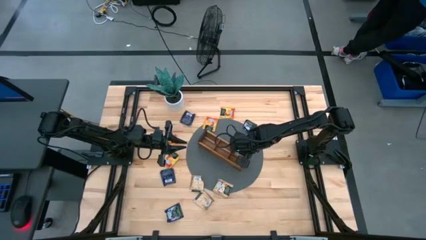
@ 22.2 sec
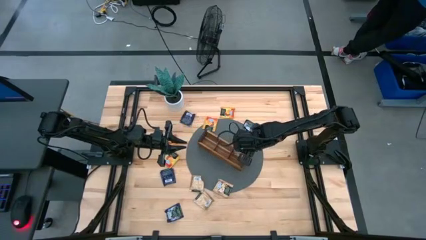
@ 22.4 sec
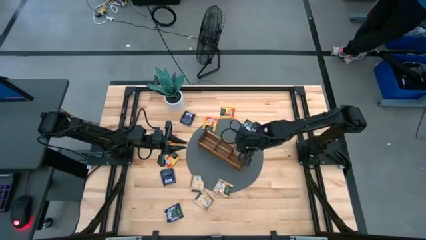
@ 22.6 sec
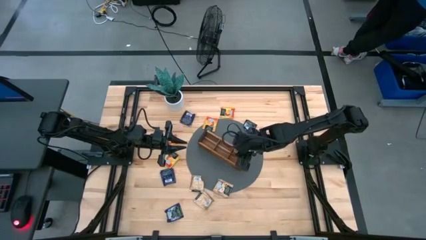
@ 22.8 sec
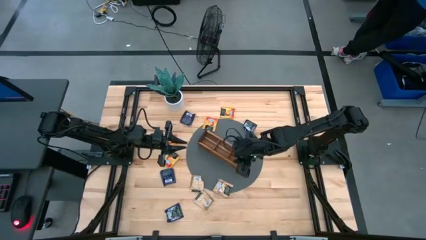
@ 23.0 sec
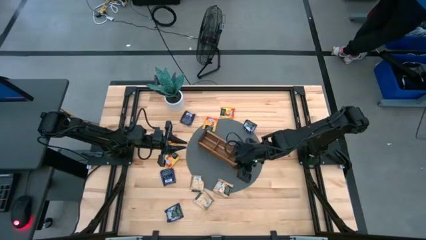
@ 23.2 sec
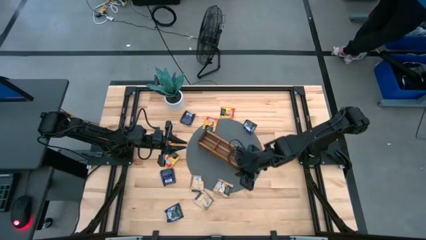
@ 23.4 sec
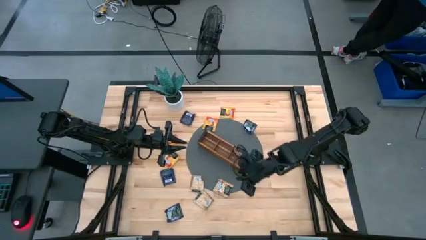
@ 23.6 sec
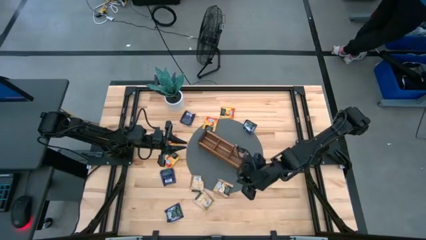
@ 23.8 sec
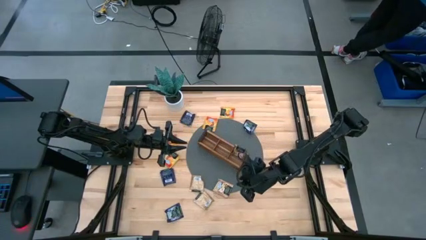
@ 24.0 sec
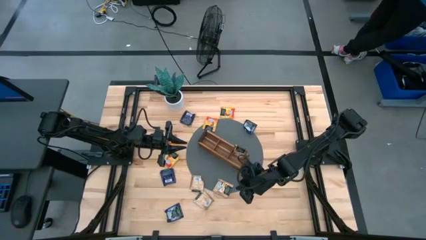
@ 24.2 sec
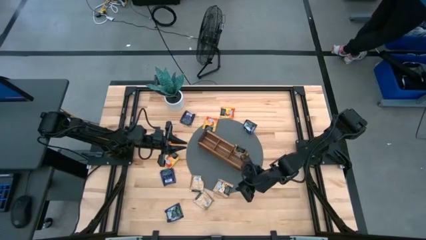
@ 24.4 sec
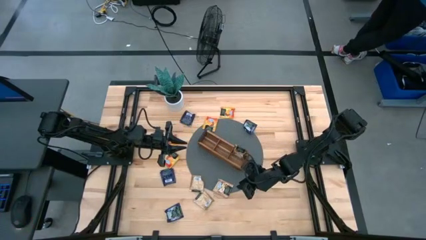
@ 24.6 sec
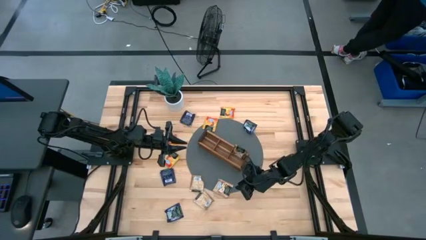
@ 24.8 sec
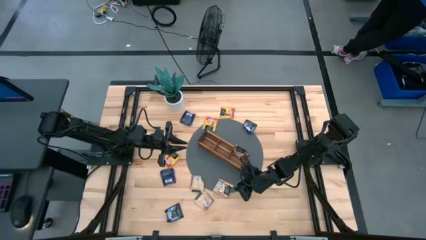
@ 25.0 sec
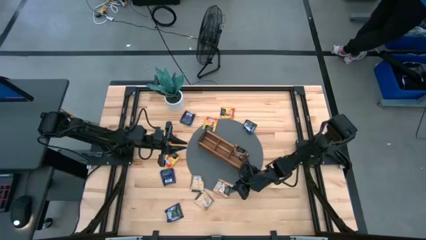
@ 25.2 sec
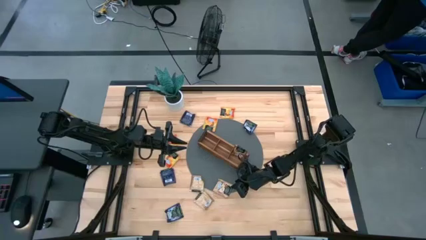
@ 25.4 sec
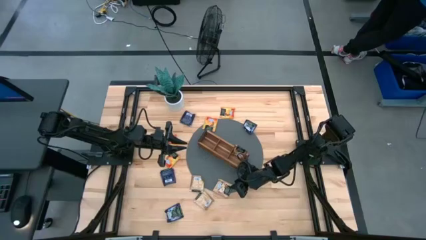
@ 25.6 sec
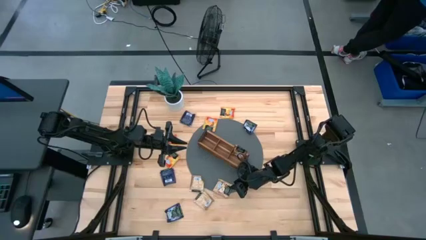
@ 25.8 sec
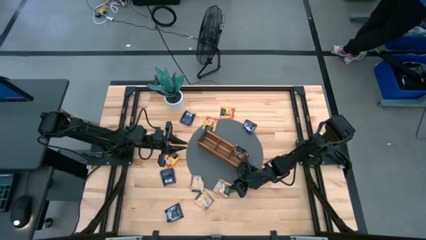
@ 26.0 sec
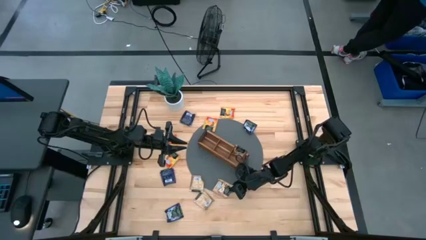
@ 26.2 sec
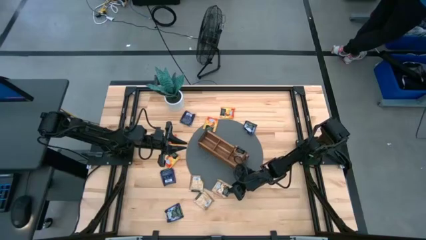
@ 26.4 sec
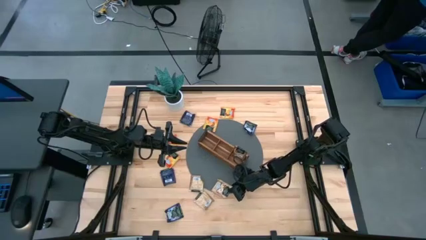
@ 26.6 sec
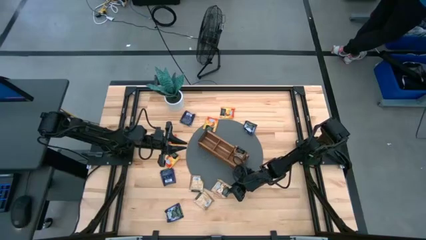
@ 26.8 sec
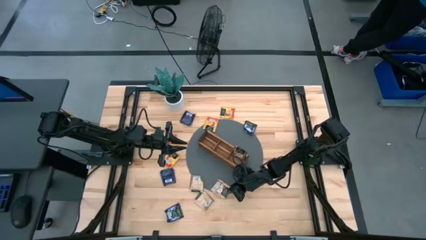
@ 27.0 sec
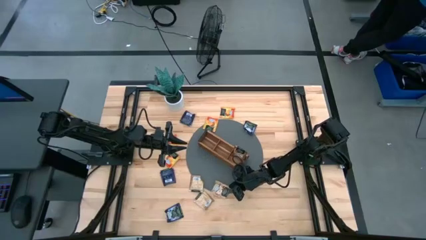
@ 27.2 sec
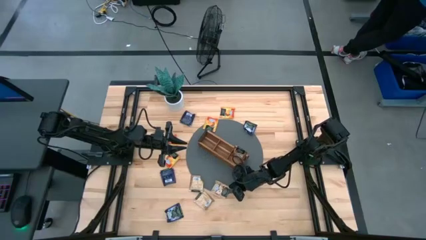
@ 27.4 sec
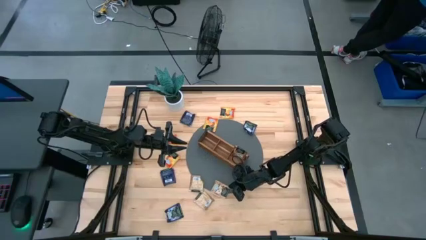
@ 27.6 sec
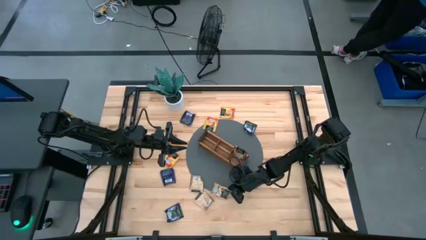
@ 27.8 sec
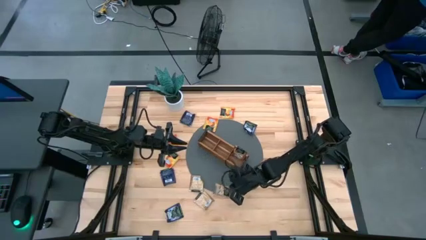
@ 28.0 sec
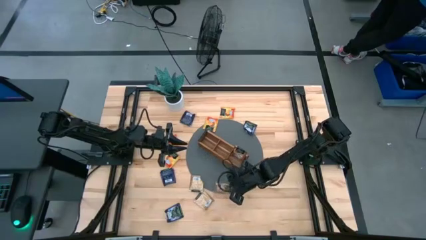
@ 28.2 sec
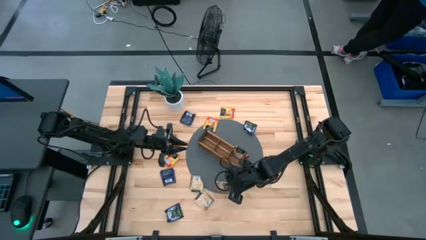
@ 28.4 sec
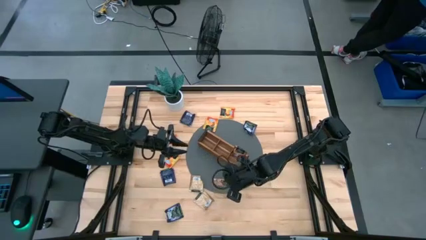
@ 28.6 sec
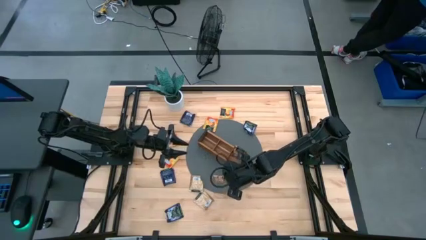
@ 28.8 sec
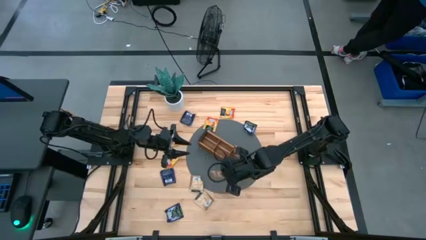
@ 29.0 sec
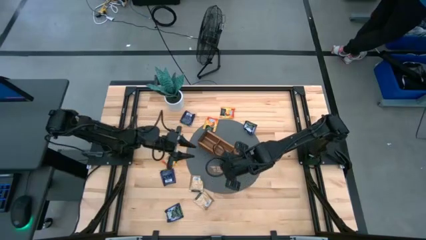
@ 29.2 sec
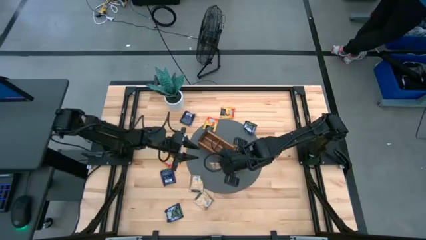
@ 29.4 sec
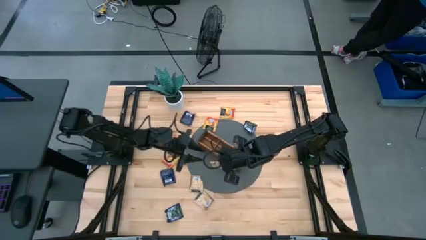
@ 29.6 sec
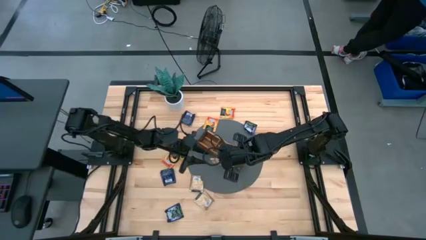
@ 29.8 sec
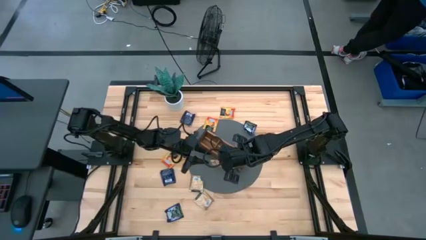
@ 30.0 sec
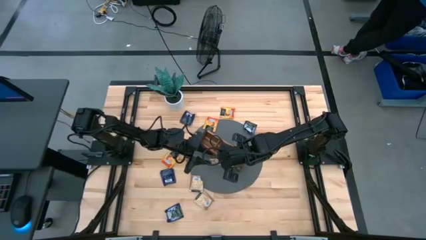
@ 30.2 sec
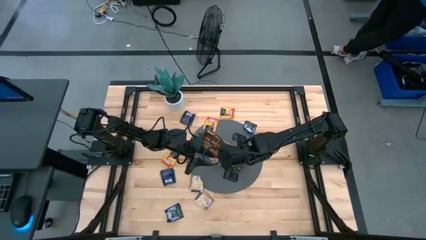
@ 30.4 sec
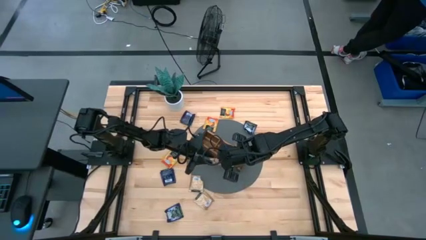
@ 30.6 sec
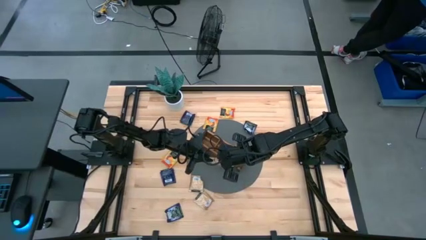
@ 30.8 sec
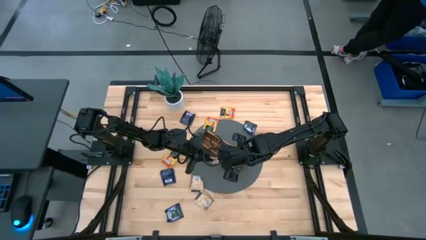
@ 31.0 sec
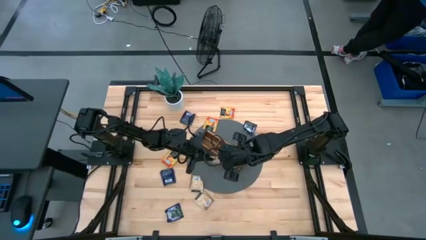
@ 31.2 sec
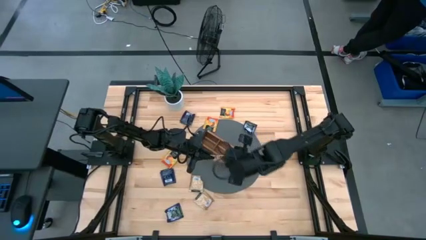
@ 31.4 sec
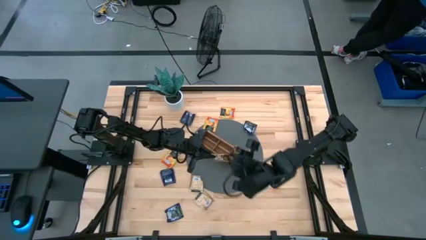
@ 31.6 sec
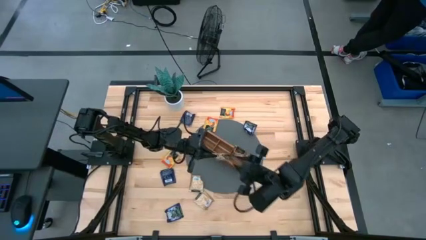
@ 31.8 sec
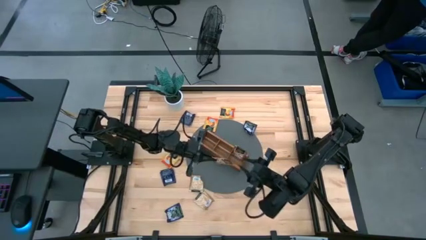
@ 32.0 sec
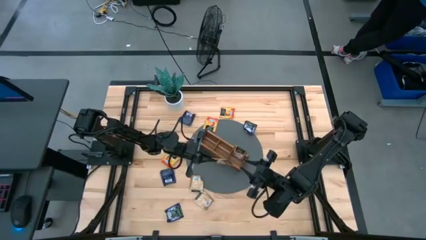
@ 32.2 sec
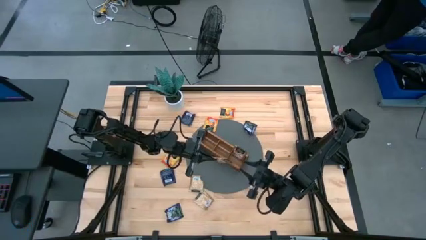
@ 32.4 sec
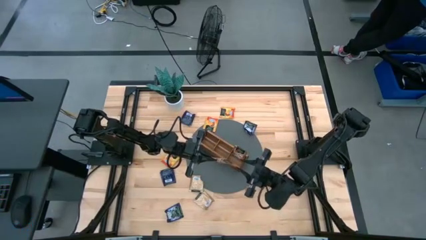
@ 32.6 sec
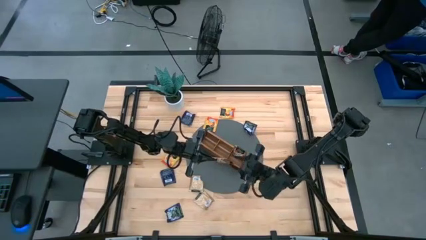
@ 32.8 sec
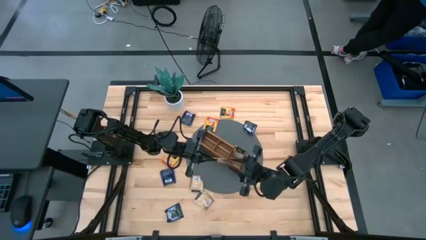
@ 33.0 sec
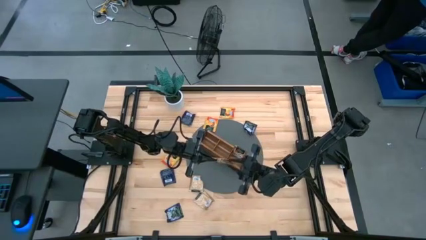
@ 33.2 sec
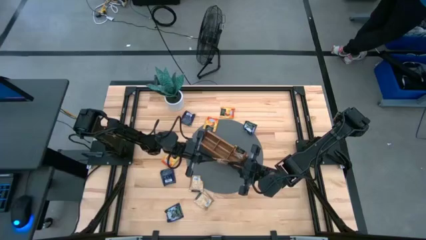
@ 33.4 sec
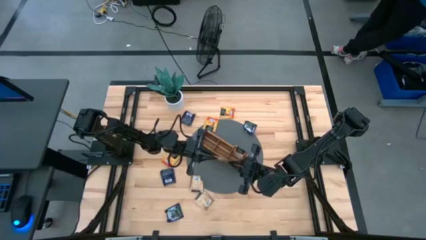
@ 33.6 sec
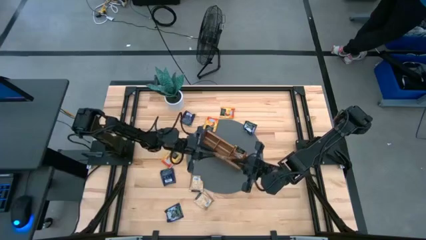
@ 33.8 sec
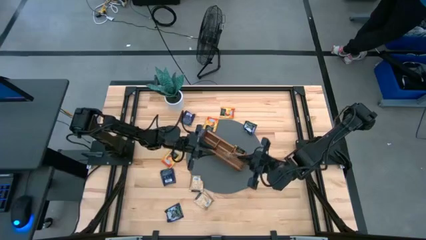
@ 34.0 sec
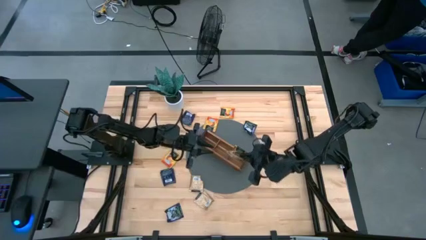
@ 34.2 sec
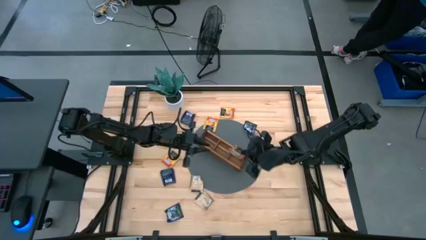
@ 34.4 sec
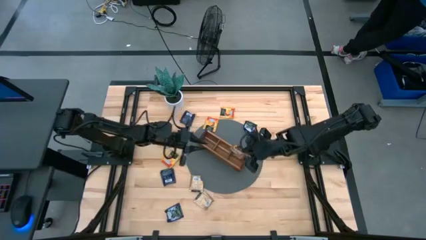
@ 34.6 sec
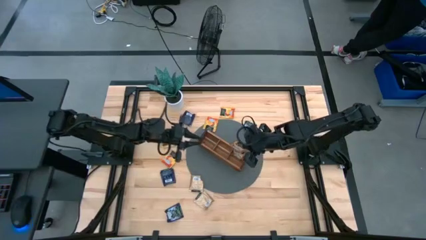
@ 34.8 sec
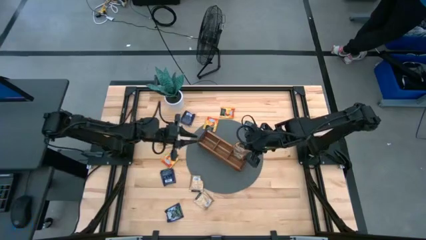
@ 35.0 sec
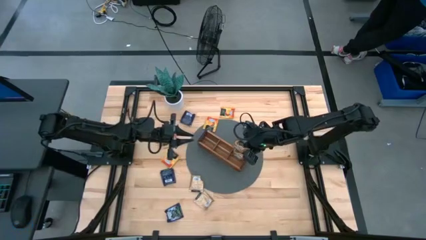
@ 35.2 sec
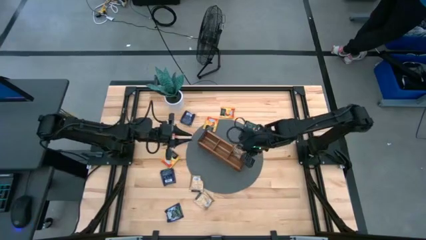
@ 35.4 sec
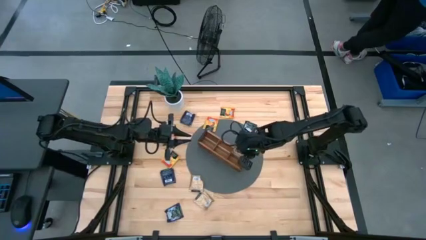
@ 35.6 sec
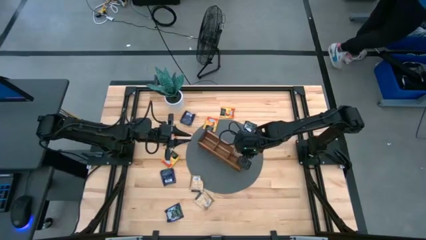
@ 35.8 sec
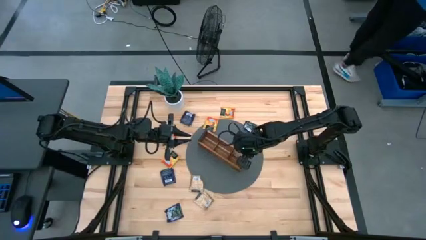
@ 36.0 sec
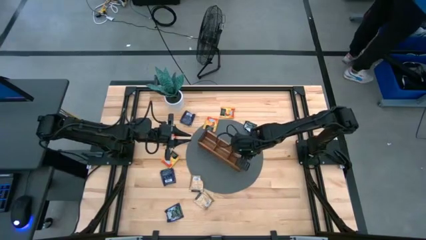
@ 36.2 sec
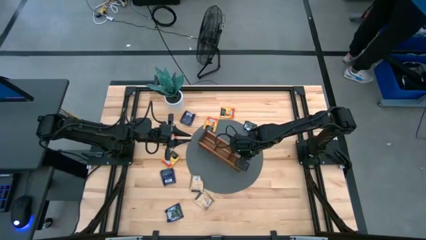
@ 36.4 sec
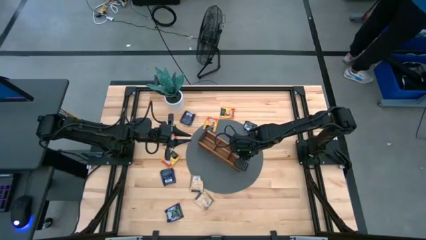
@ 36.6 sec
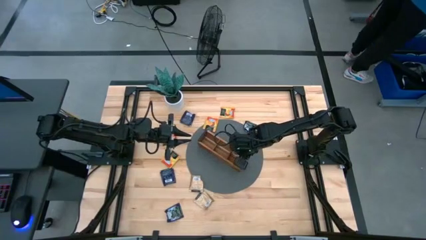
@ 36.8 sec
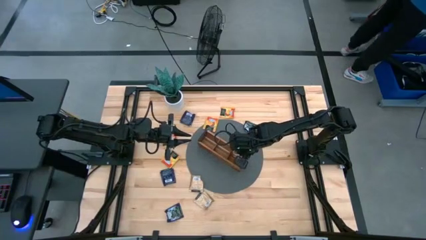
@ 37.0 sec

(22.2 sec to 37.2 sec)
Task: Pick & Place Tea
Put the brown tea bag into the right section of the wooden organizer
